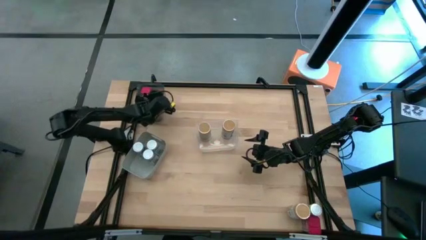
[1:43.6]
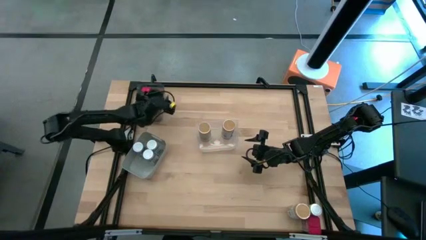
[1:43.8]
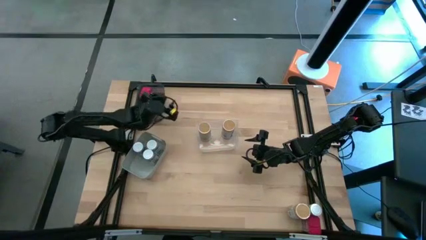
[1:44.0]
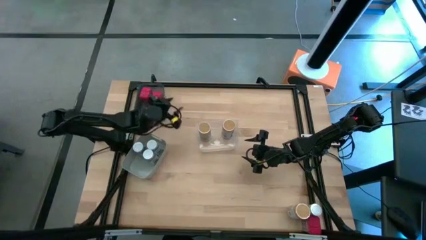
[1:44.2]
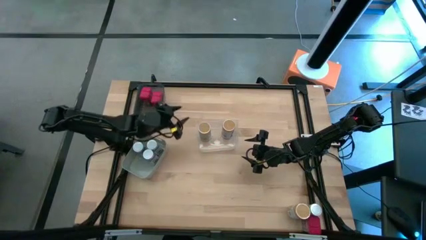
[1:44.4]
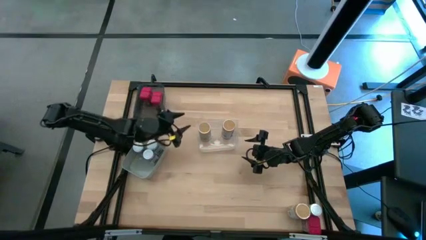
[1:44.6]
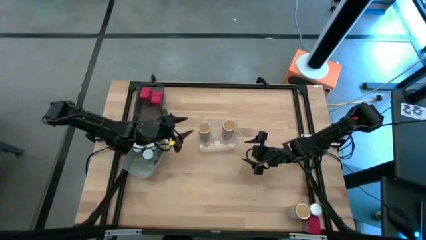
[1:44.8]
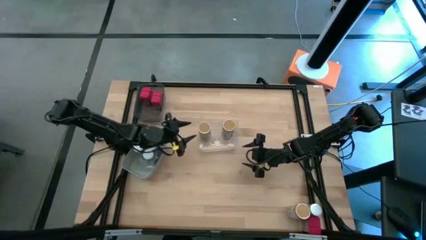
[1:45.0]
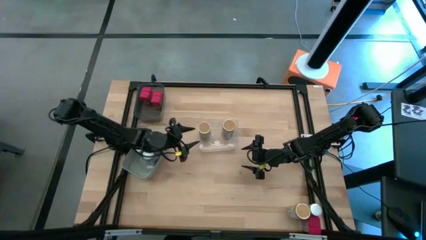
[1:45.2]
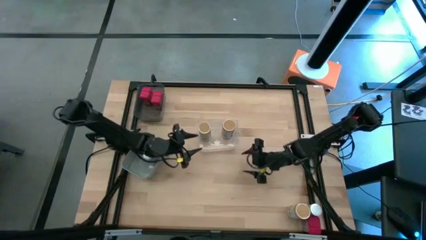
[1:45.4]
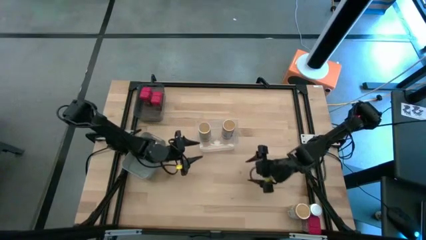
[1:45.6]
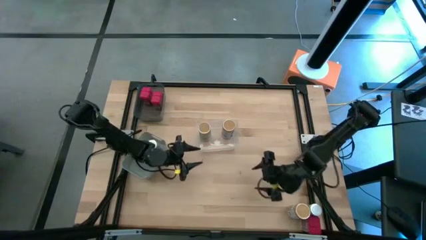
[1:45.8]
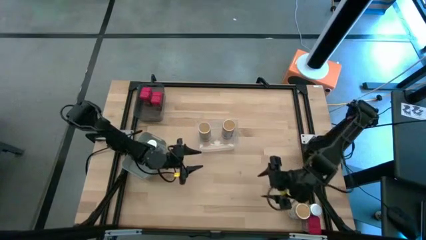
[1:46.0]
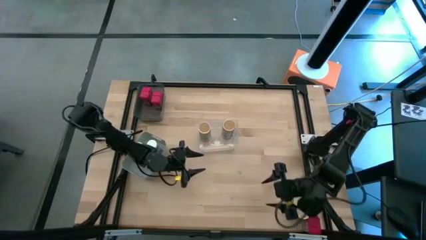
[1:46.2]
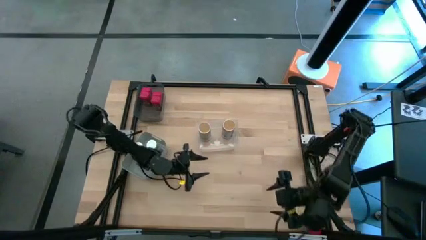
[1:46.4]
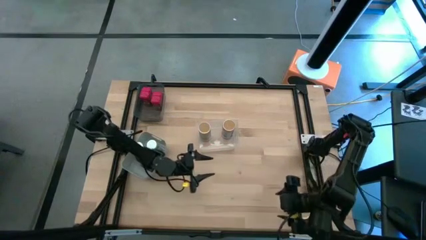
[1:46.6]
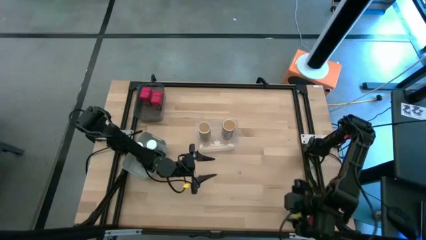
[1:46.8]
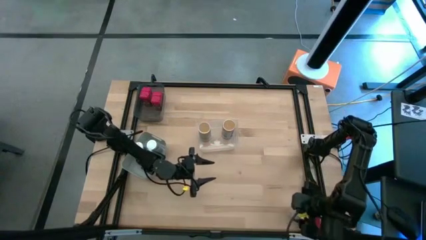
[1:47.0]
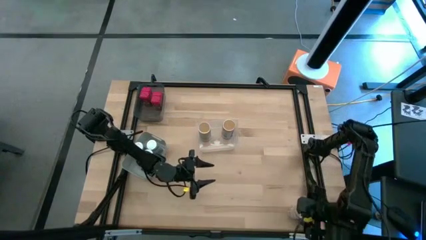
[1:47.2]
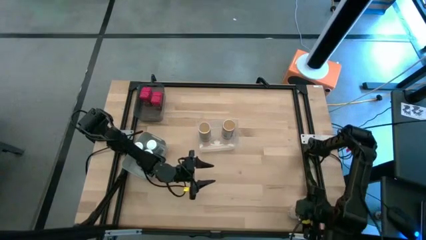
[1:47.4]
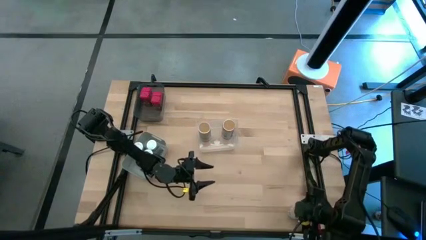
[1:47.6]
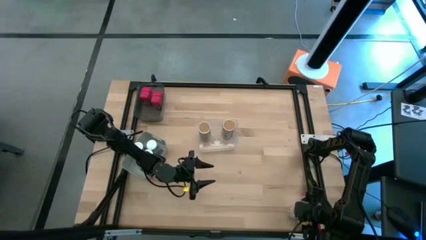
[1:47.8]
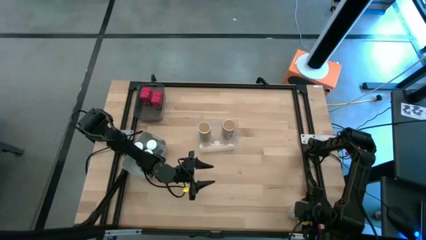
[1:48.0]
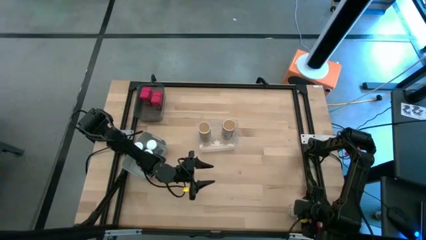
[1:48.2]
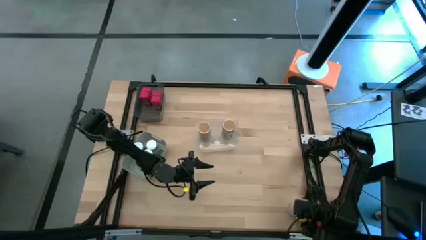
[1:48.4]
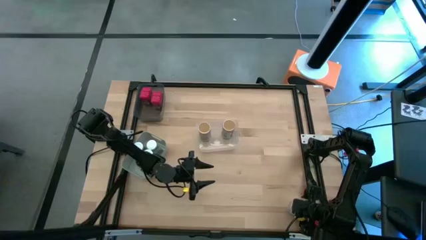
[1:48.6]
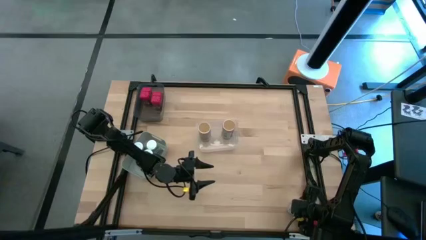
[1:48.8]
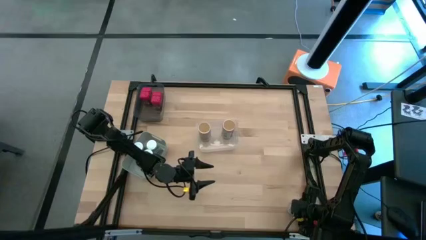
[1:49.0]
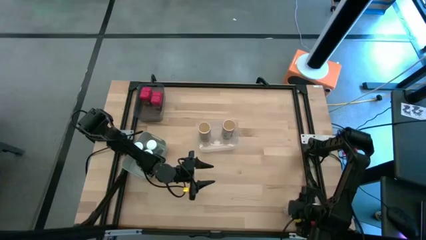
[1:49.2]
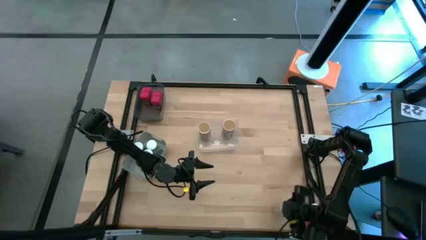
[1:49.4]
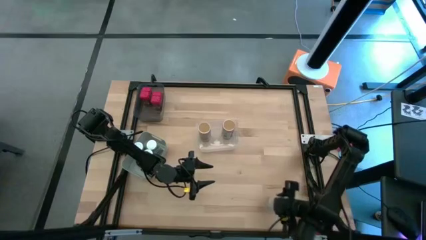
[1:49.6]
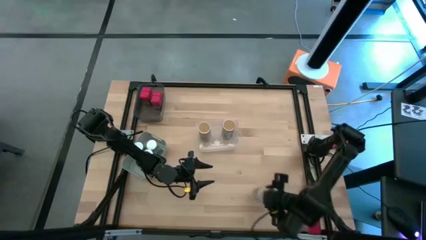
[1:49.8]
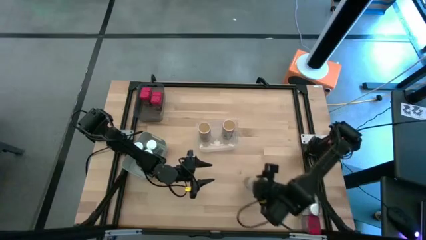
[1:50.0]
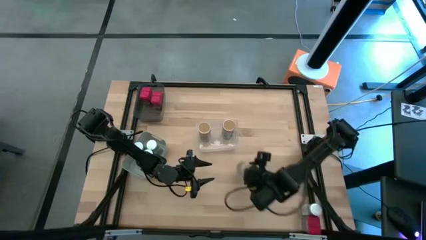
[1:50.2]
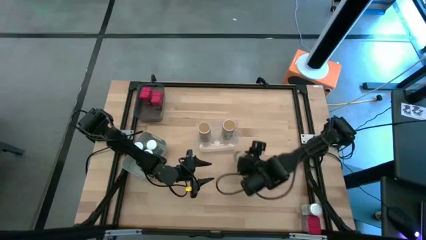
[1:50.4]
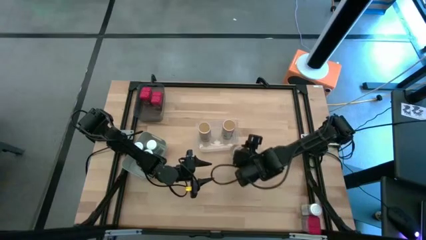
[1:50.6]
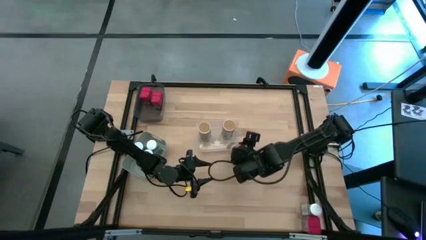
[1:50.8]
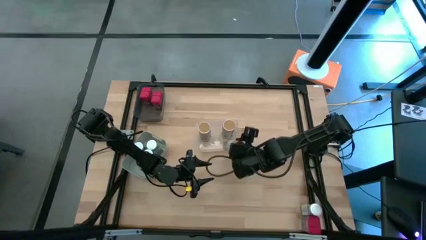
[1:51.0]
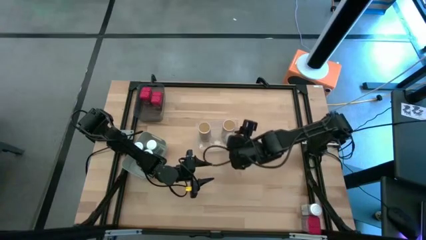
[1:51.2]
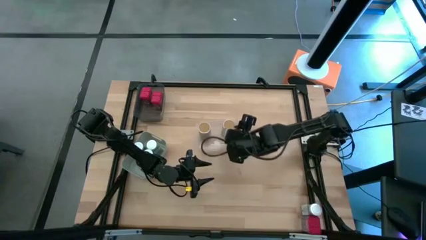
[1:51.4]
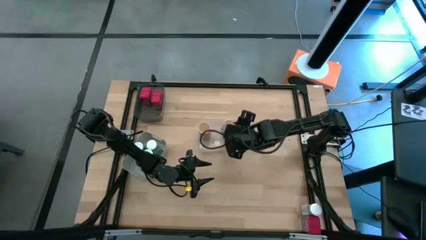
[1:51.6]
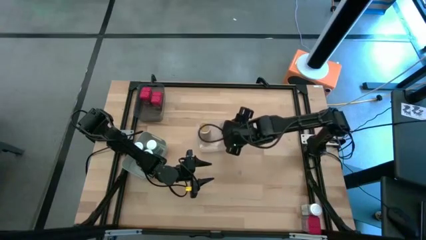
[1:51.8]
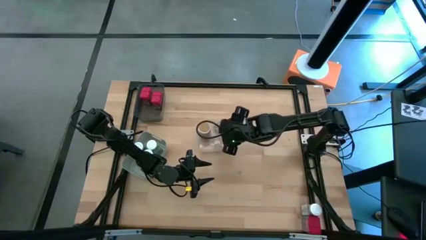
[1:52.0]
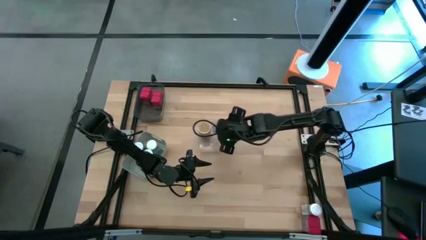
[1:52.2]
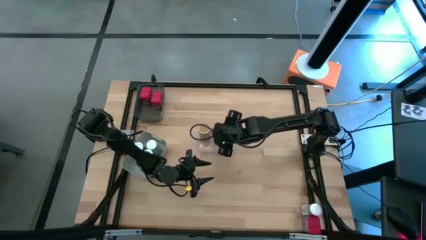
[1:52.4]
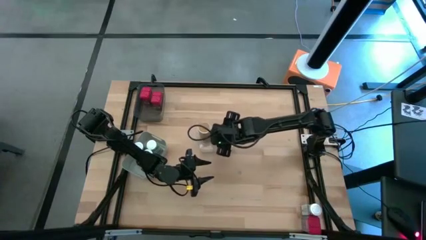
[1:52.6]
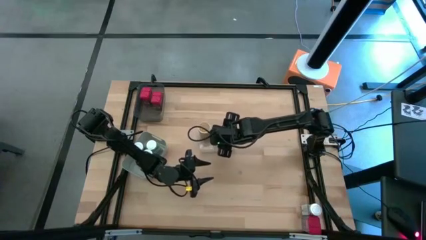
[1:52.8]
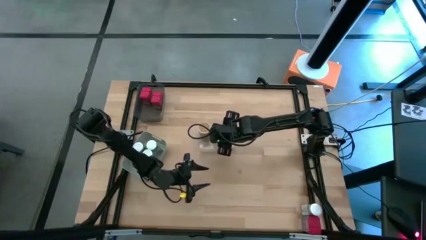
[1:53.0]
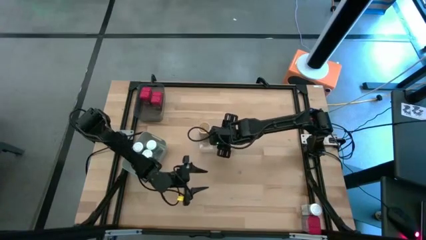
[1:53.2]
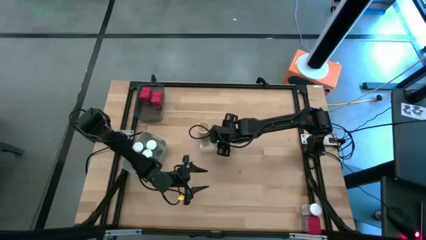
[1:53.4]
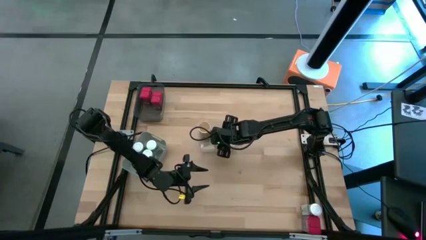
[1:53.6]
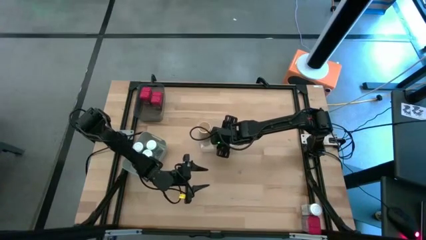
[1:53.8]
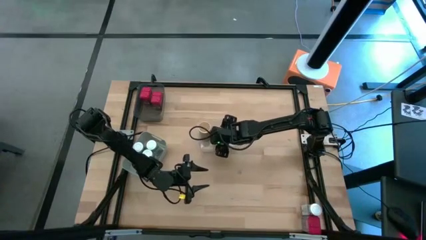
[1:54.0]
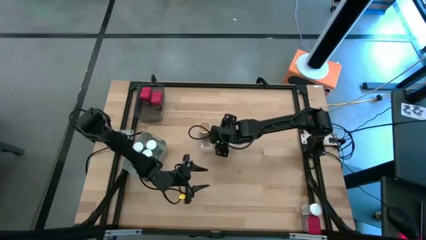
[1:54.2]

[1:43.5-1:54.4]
Task: Sort spices by type
Put the brown seasoning bottle into the transparent bin

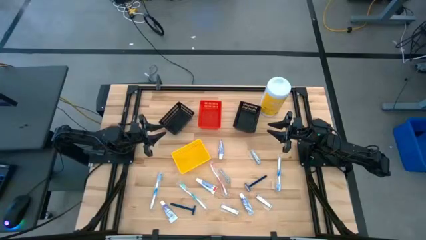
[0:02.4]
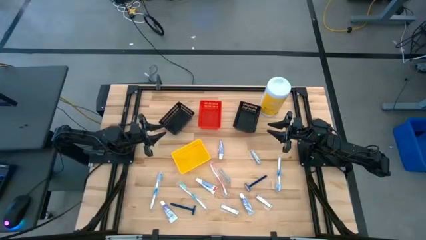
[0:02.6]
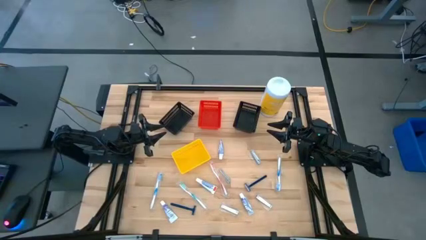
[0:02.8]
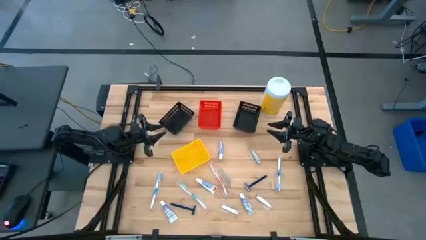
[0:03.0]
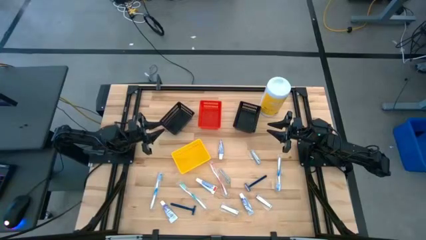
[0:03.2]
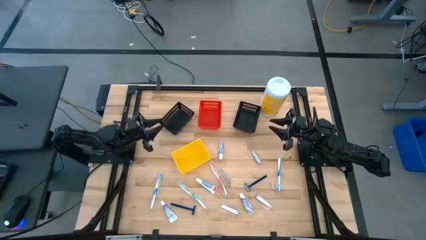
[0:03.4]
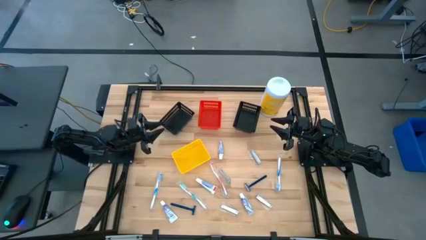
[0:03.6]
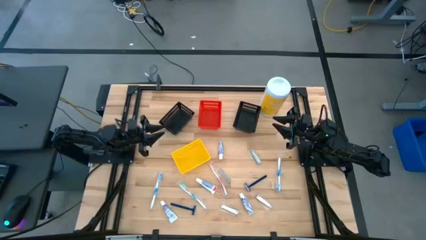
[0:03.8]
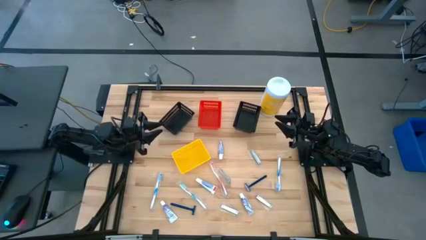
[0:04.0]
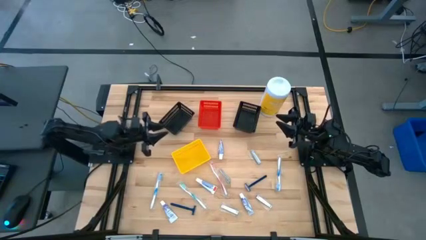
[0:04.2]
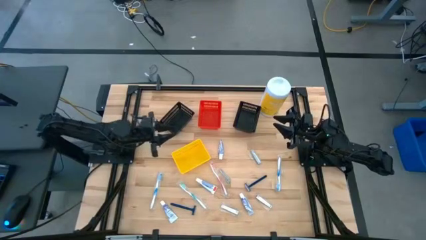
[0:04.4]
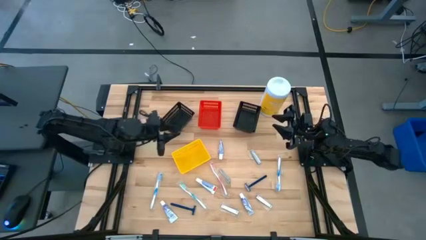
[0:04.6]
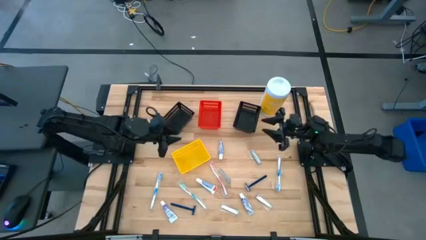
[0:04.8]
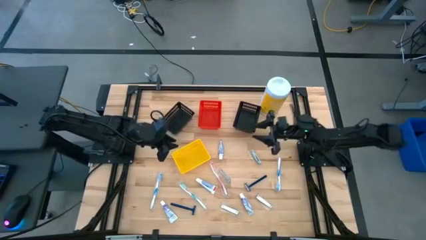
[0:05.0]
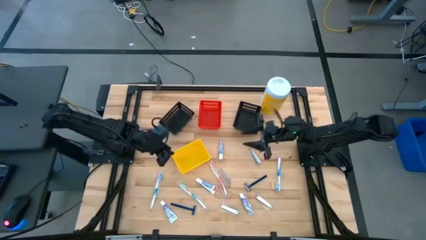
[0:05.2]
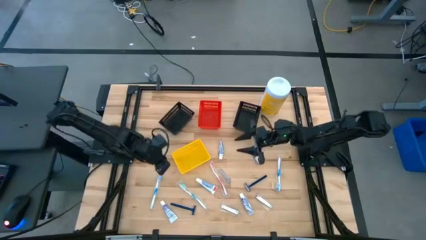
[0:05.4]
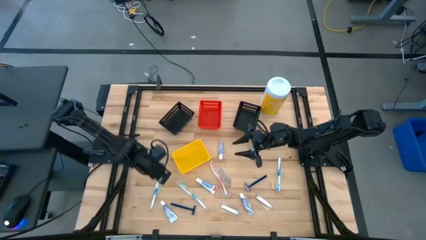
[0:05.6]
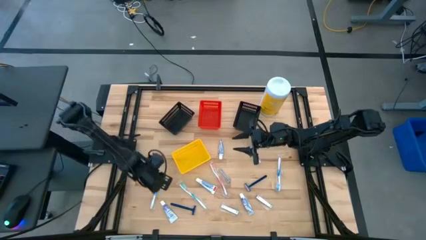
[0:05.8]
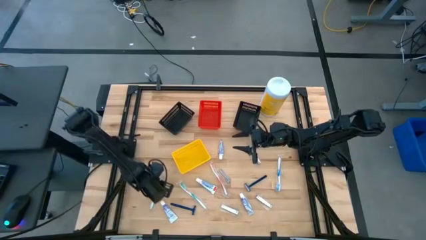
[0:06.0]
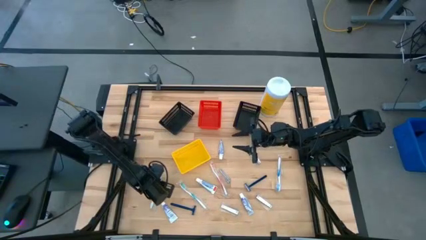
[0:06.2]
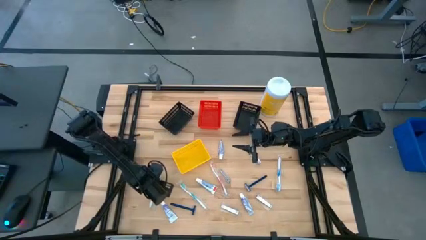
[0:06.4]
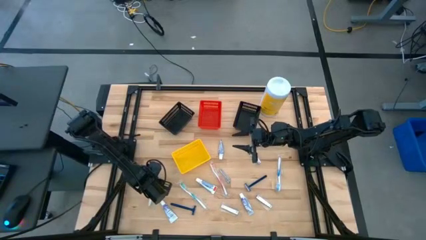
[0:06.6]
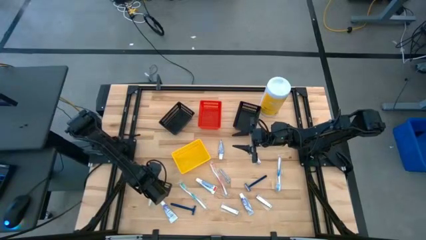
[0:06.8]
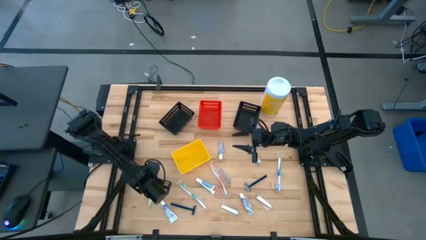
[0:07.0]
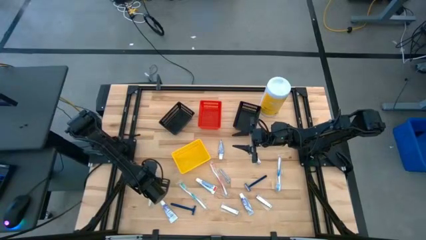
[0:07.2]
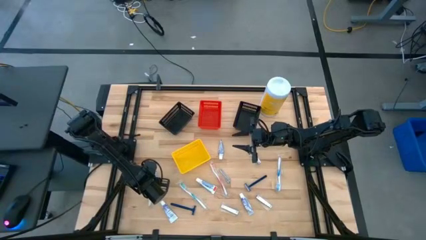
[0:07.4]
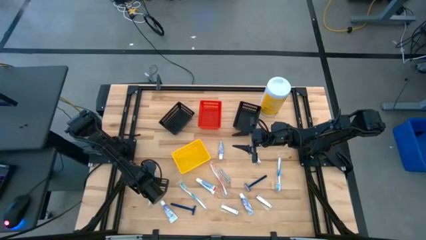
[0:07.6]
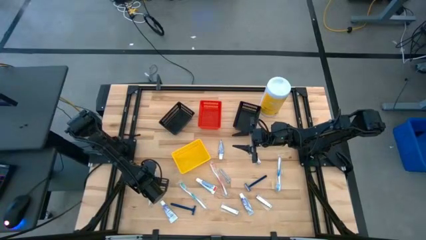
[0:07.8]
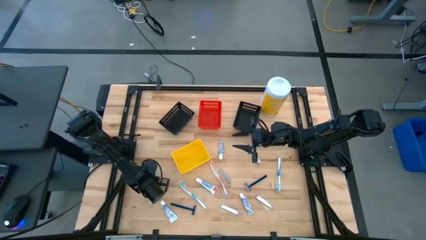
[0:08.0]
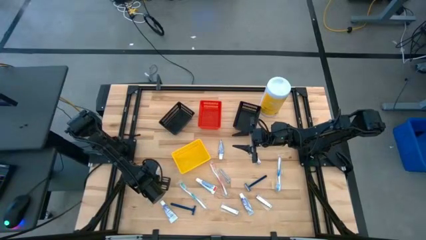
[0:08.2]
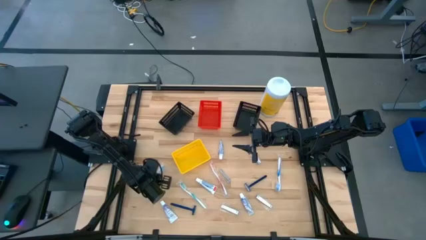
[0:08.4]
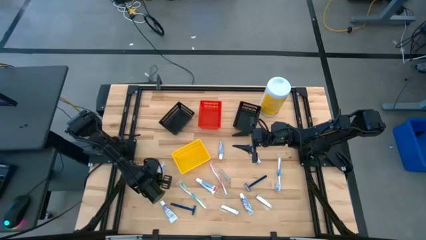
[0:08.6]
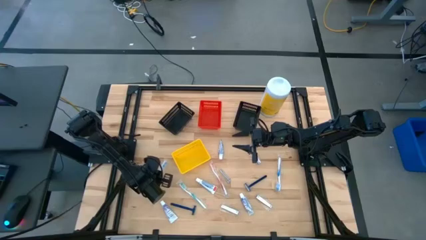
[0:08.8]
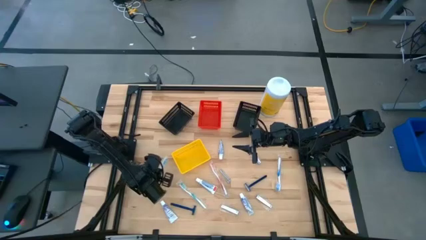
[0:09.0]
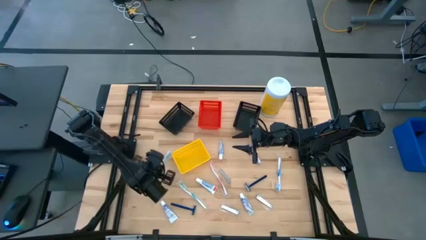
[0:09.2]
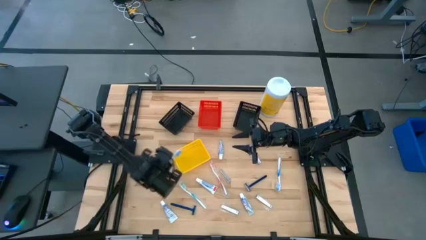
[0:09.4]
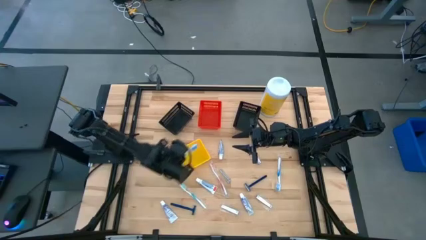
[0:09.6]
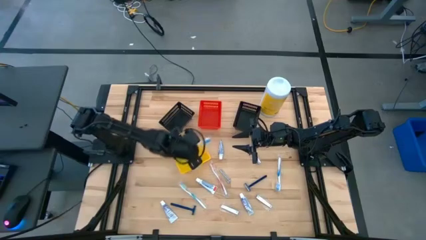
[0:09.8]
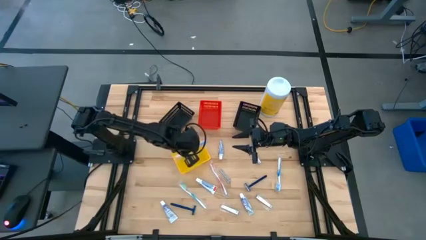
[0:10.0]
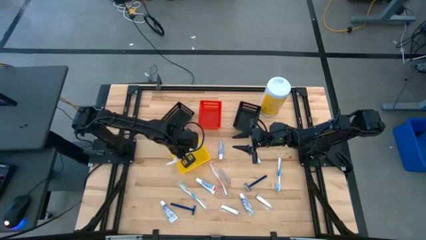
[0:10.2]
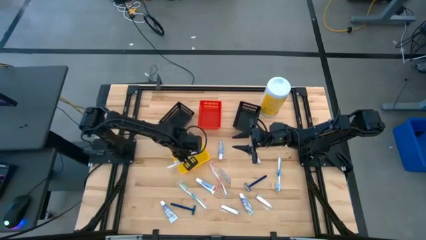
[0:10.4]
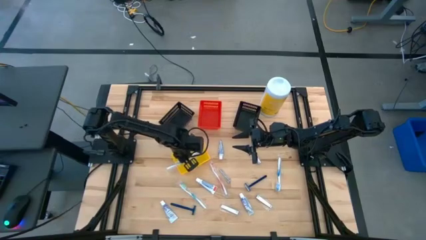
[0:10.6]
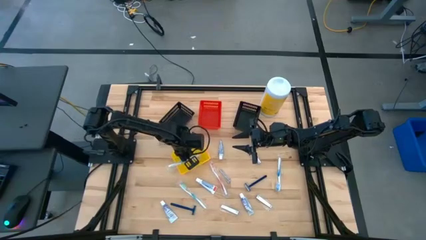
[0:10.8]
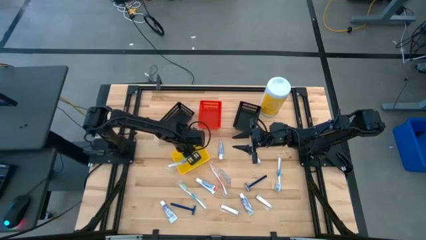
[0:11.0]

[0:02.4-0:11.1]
Task: Pick & Place Travel size toiletries
Put the left blue toothbrush into the yellow bin
